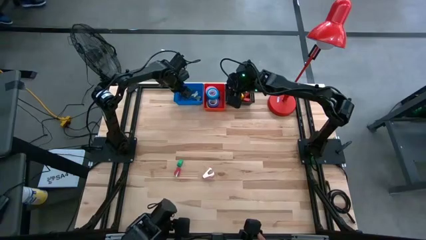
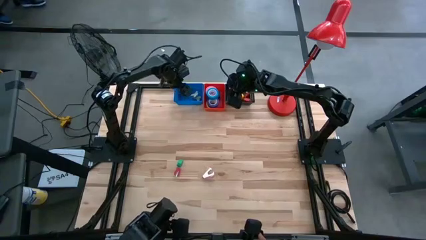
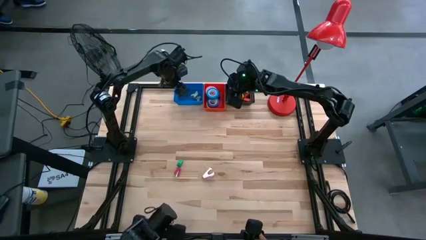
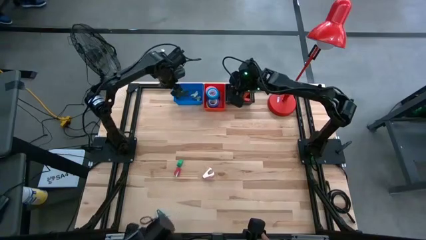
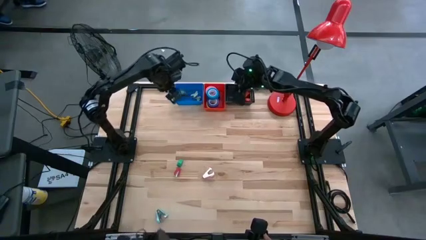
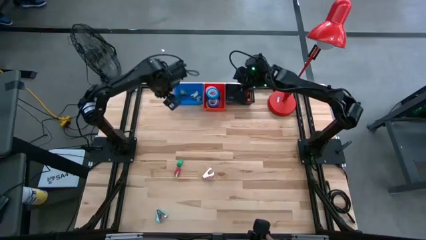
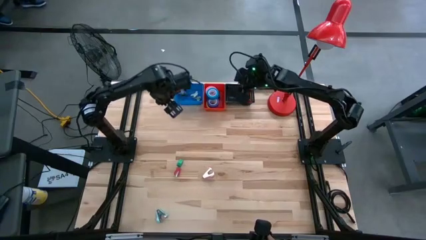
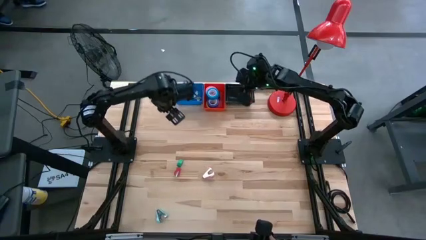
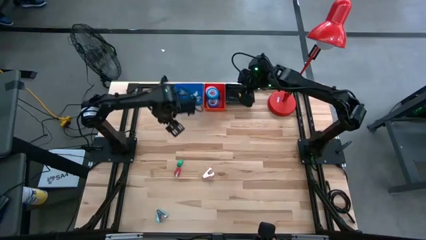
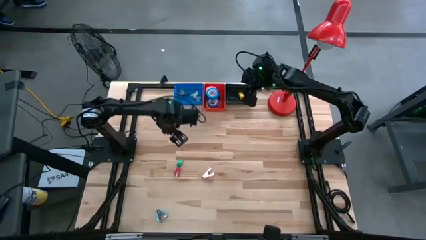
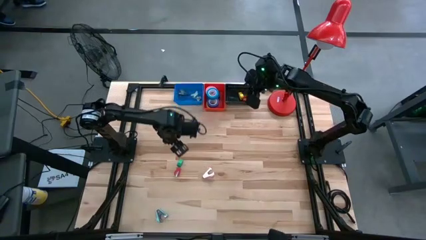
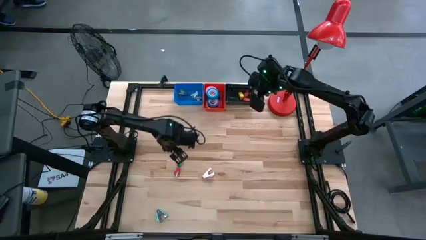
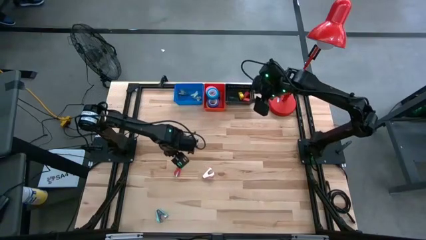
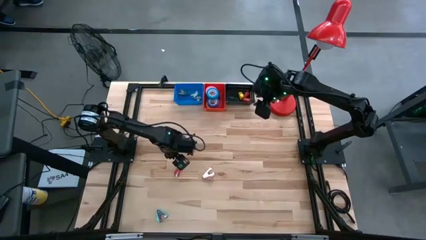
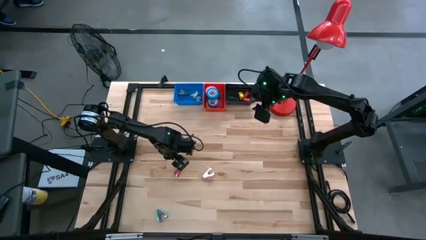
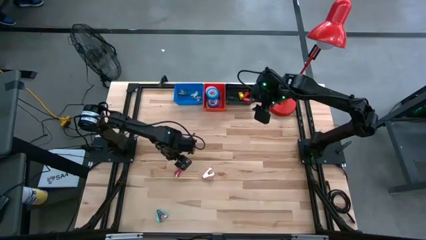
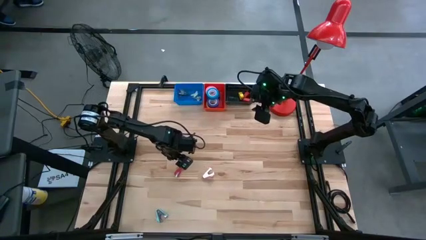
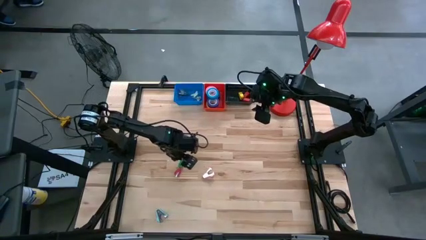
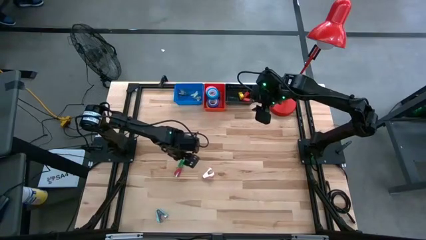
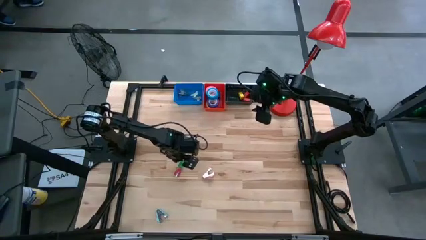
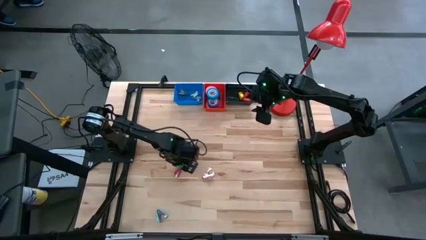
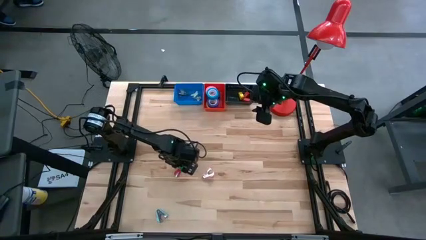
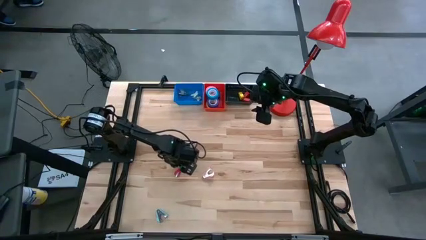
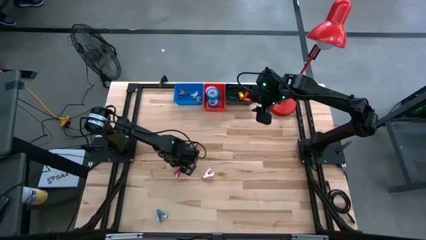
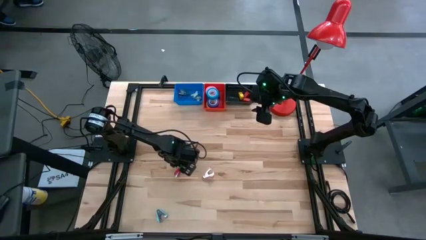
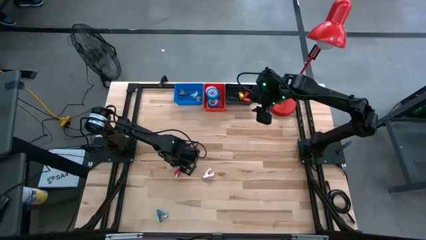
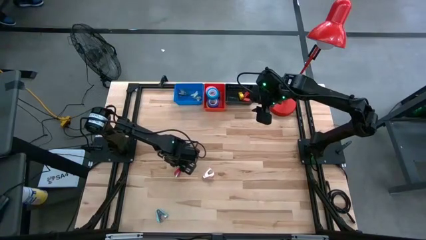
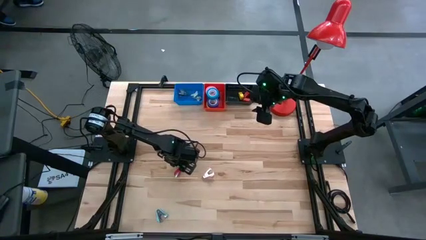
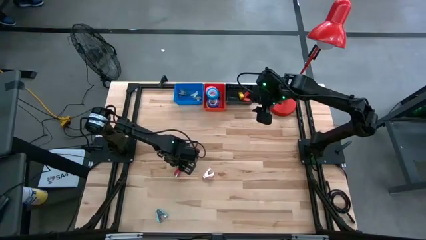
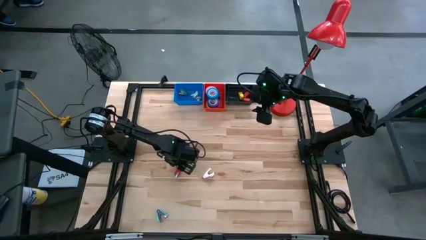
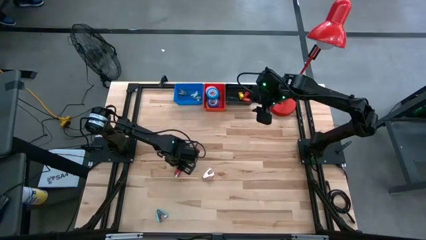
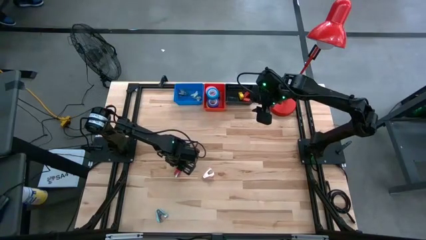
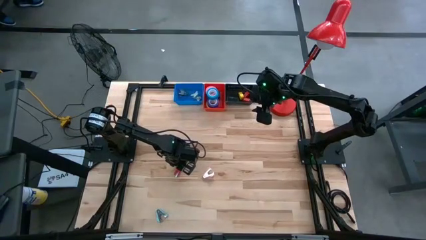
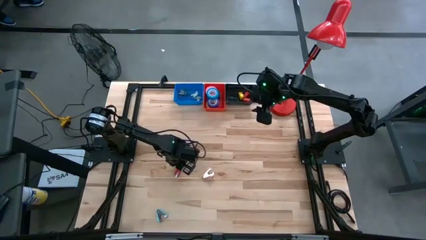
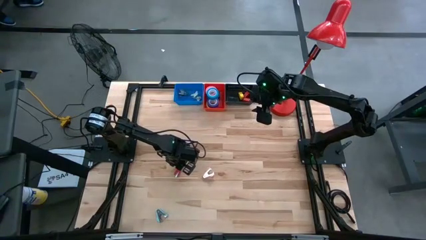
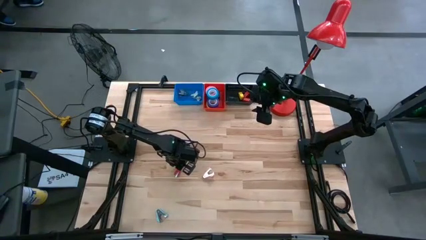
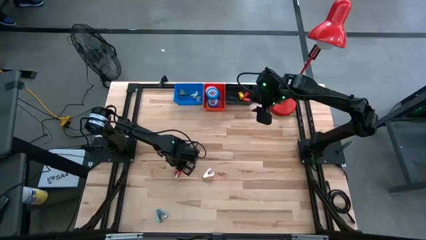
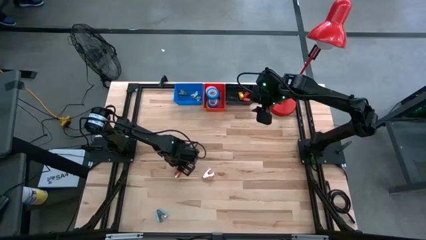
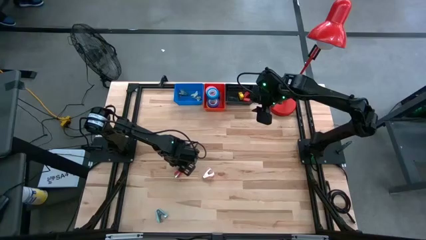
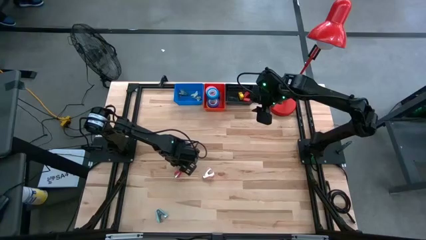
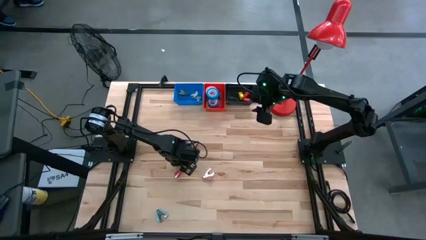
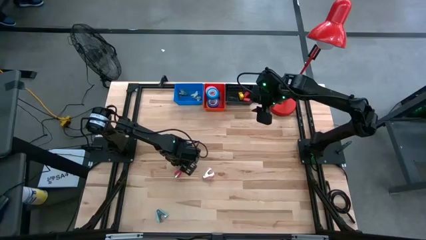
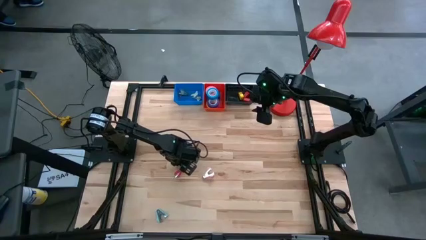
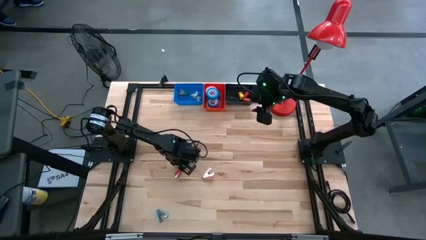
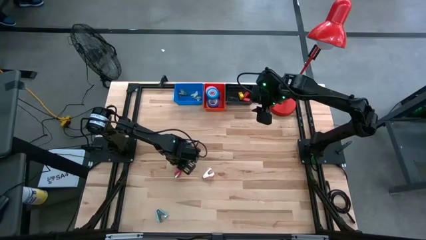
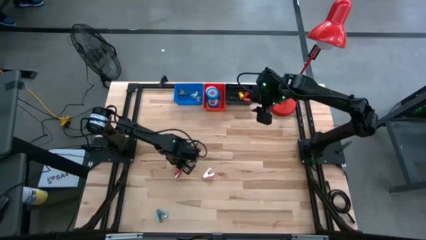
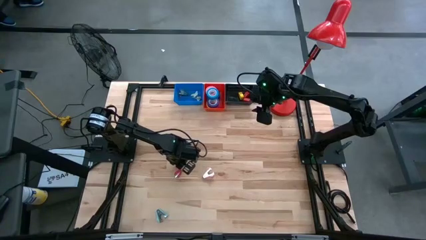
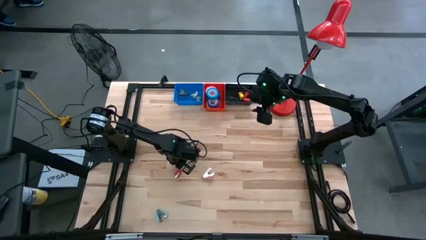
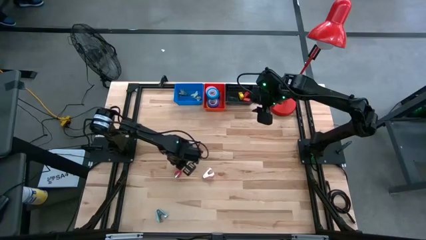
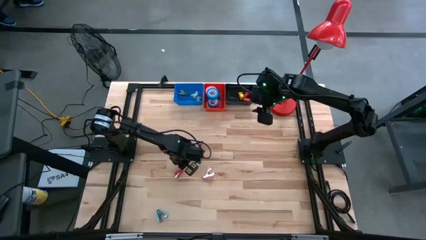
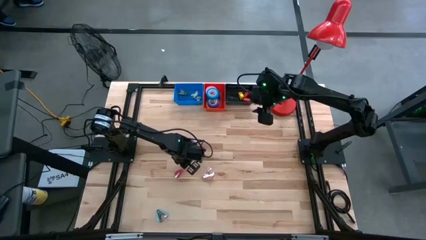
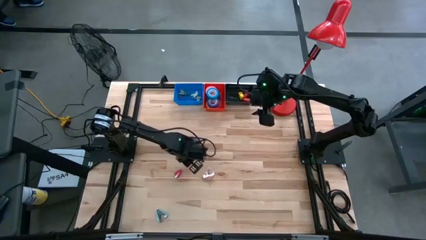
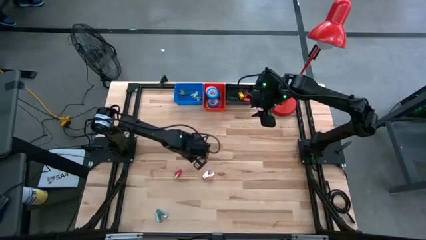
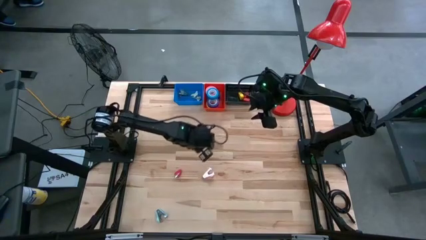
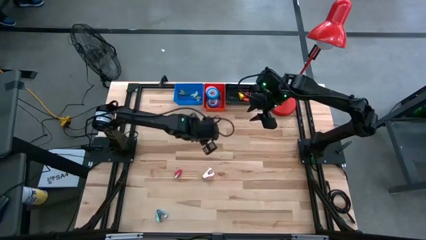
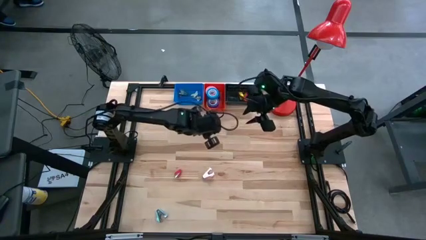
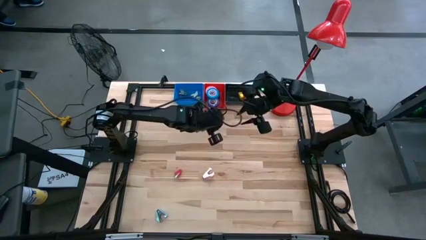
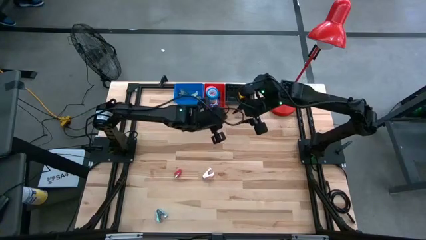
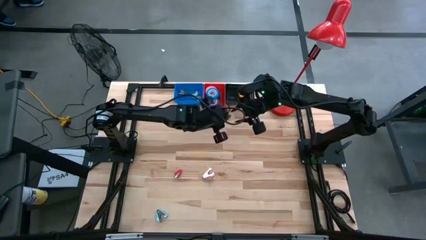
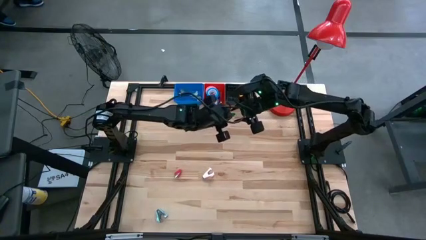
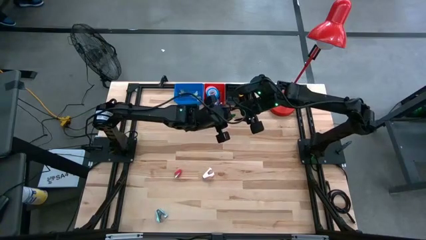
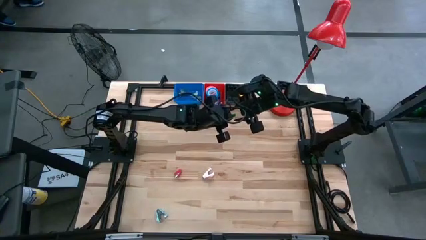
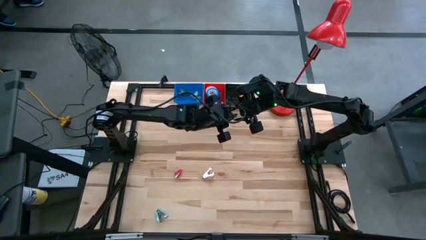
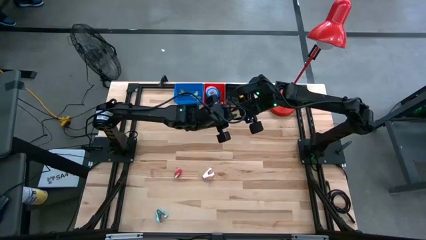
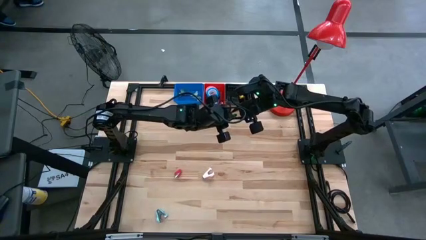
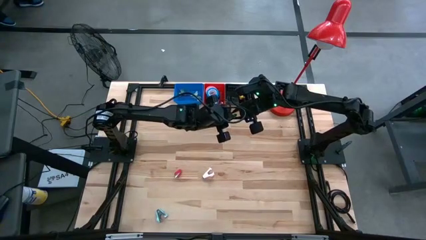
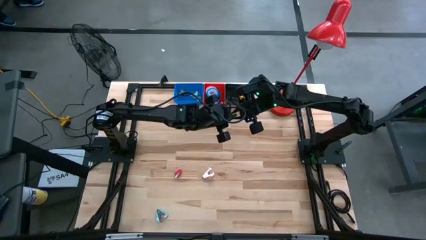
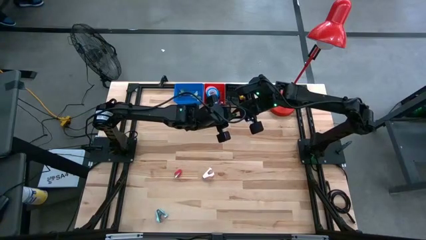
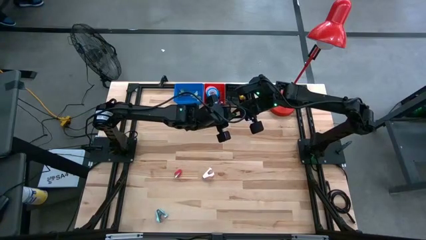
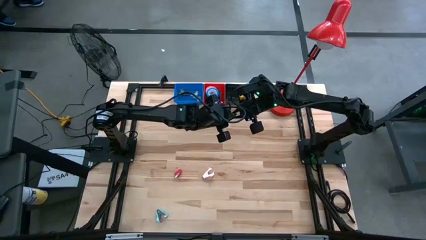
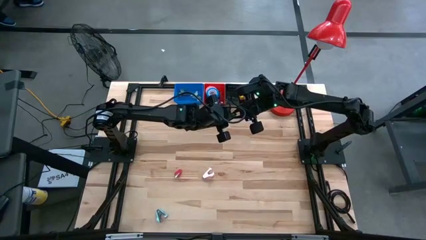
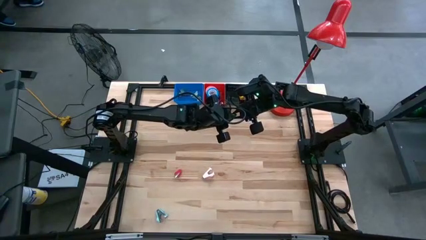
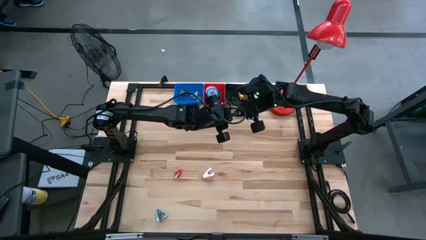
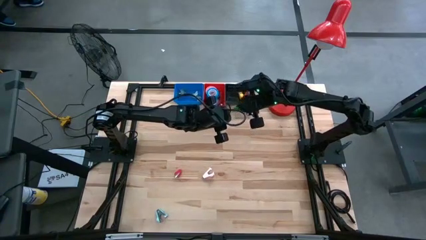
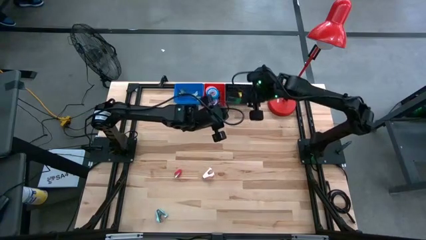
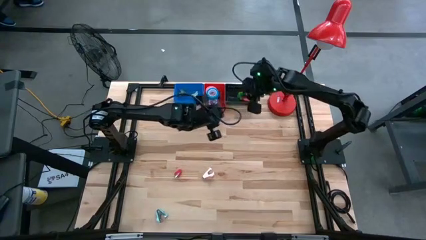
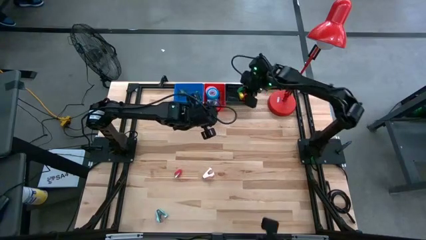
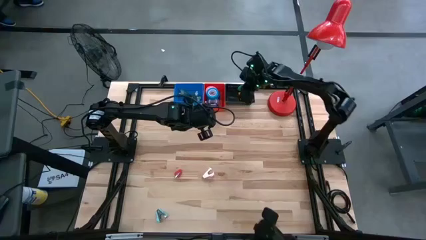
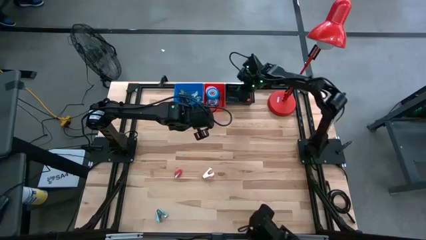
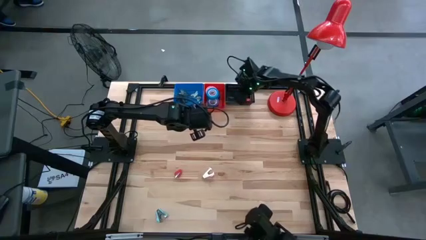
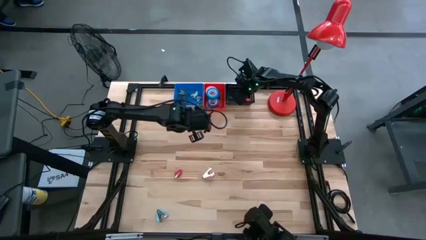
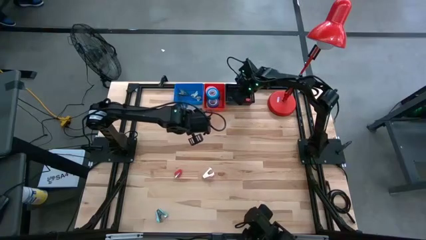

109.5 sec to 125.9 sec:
Task: Pick and place Stapler, Stapler remover, tape
Put the green stapler into the black basket
